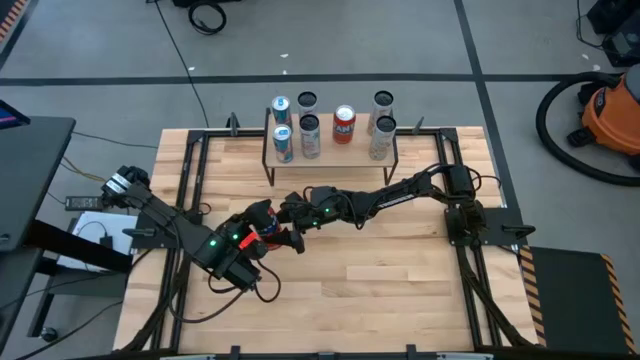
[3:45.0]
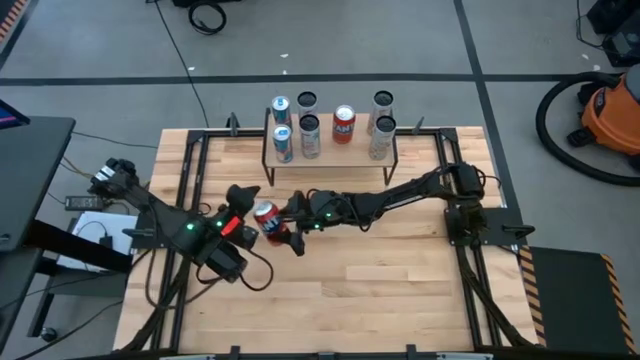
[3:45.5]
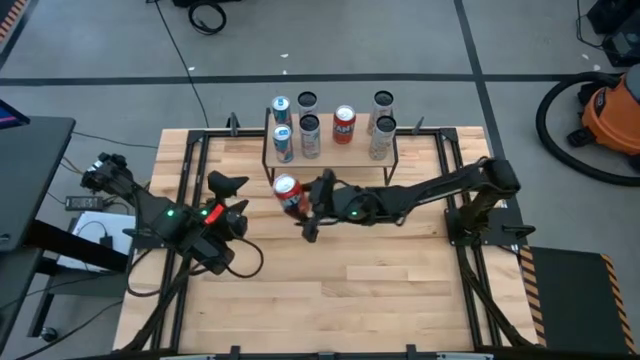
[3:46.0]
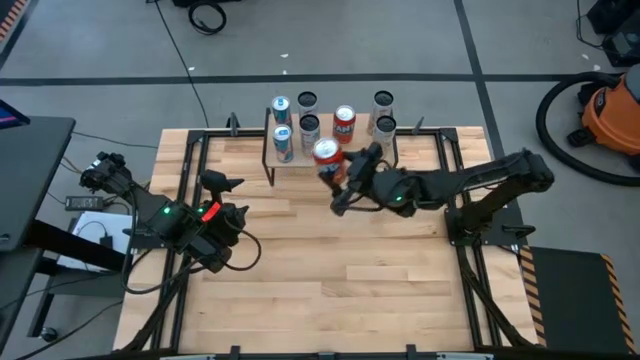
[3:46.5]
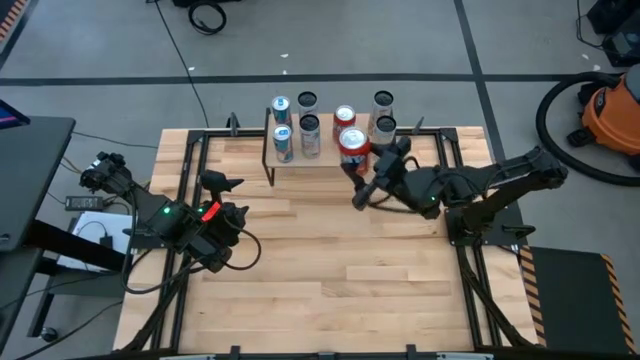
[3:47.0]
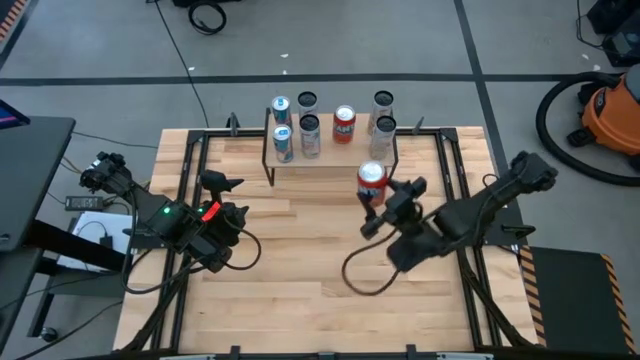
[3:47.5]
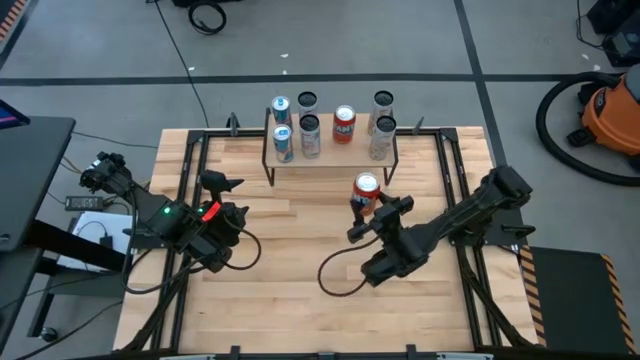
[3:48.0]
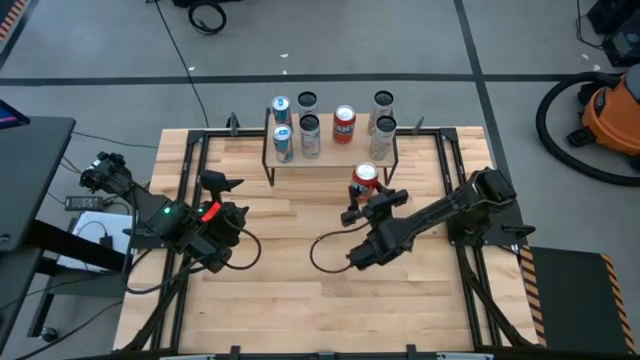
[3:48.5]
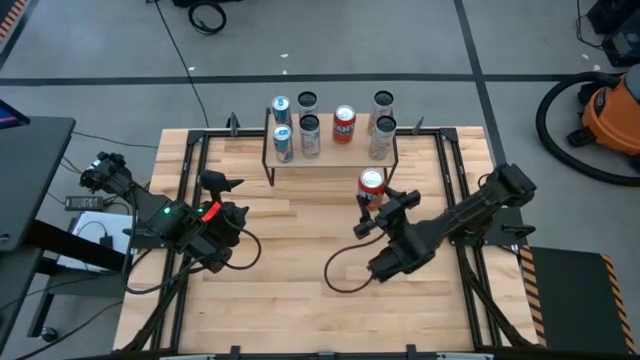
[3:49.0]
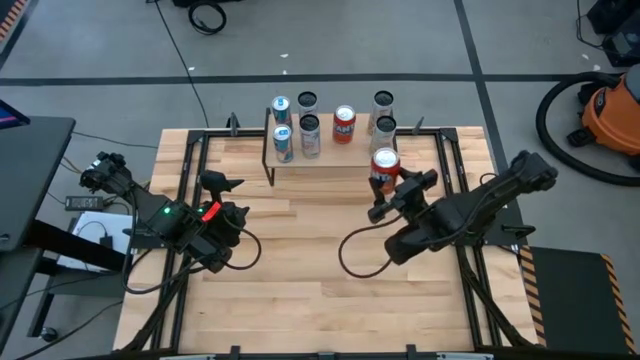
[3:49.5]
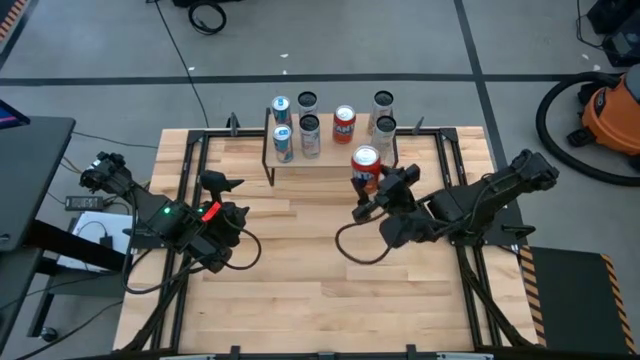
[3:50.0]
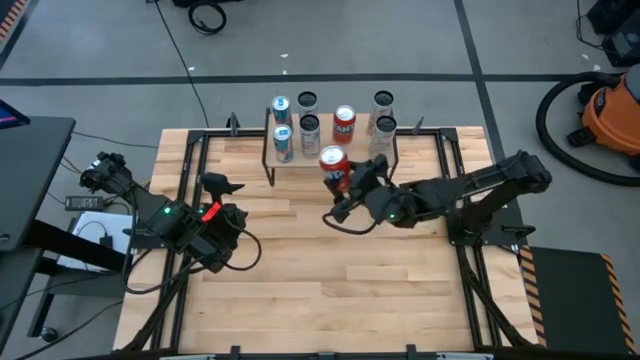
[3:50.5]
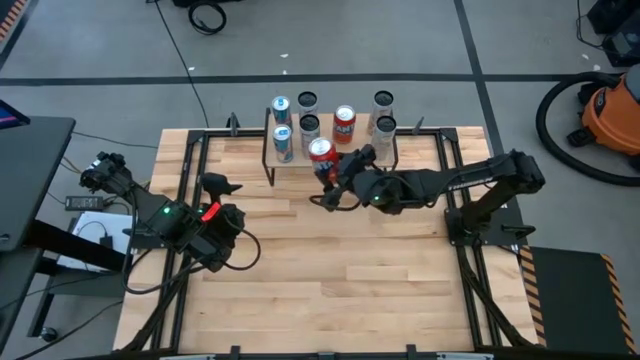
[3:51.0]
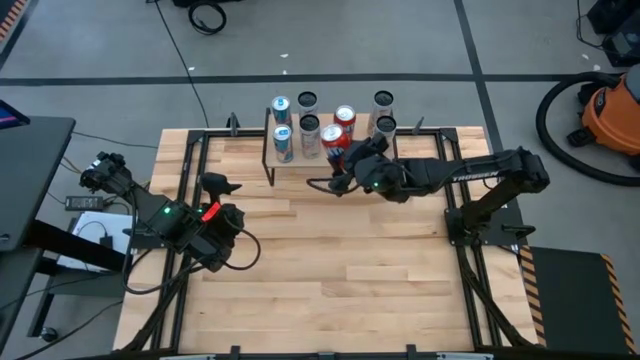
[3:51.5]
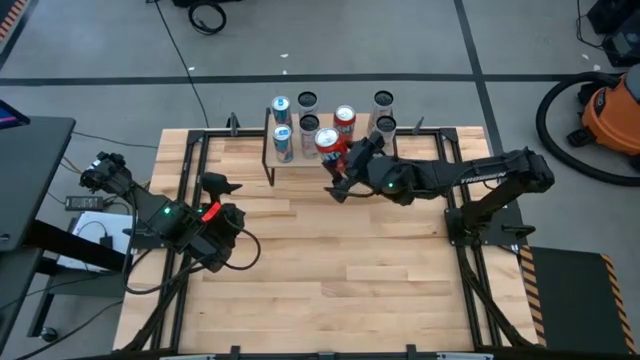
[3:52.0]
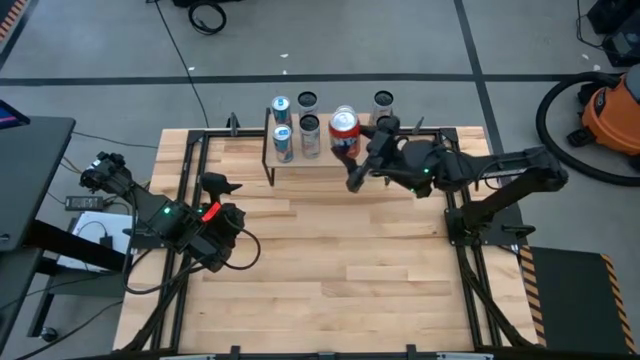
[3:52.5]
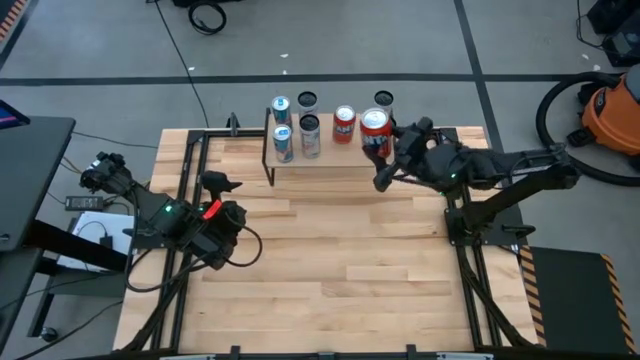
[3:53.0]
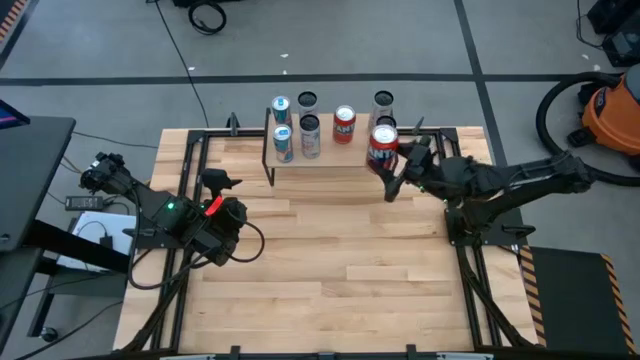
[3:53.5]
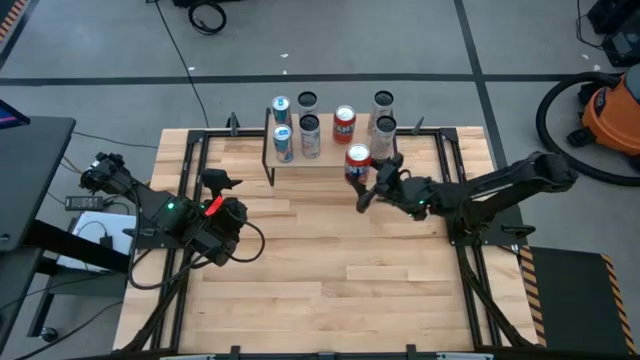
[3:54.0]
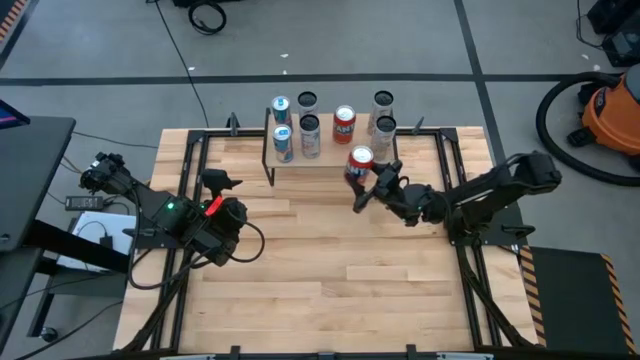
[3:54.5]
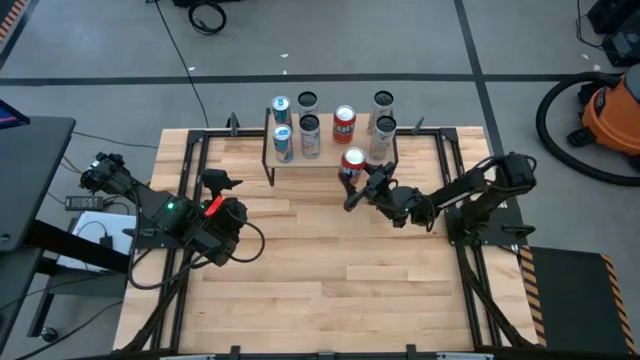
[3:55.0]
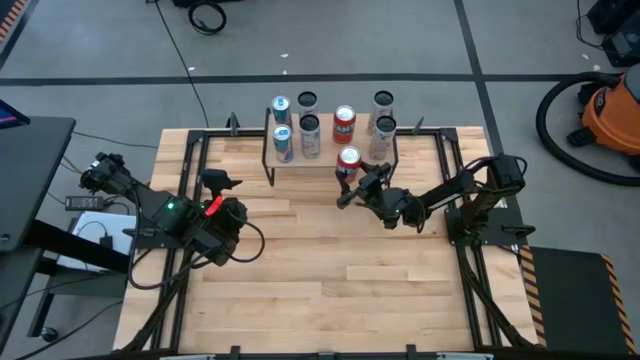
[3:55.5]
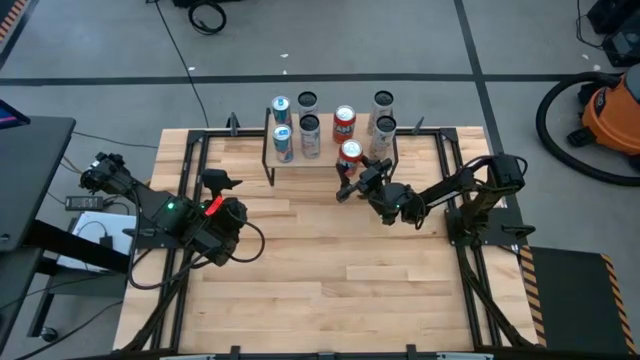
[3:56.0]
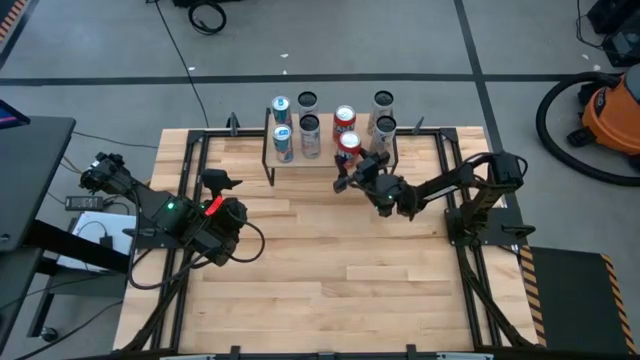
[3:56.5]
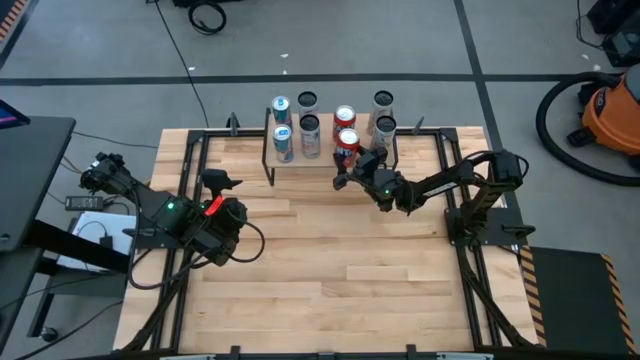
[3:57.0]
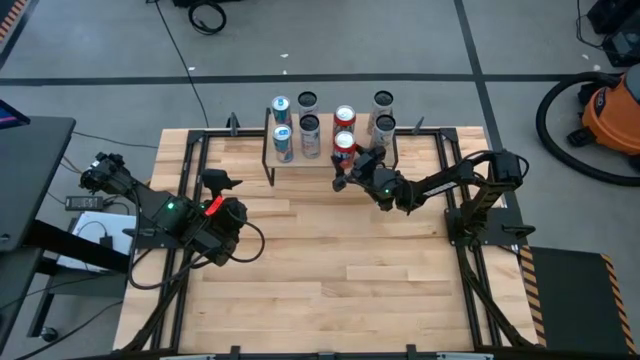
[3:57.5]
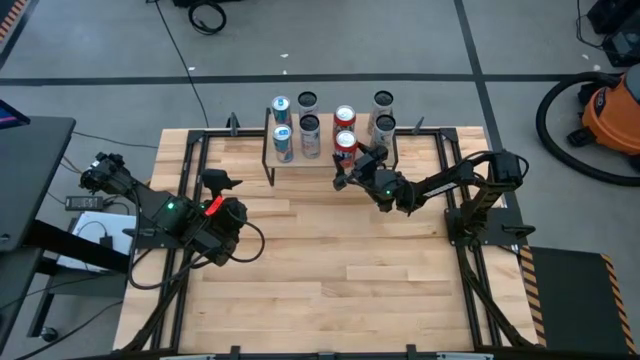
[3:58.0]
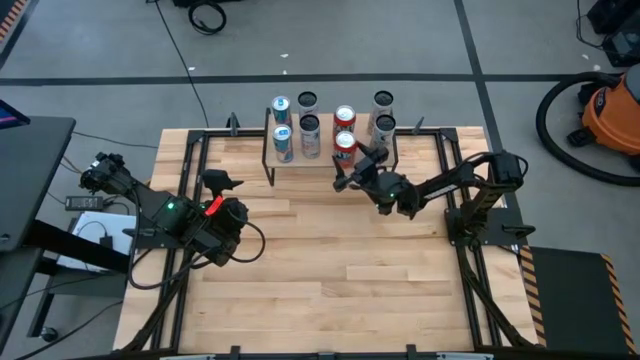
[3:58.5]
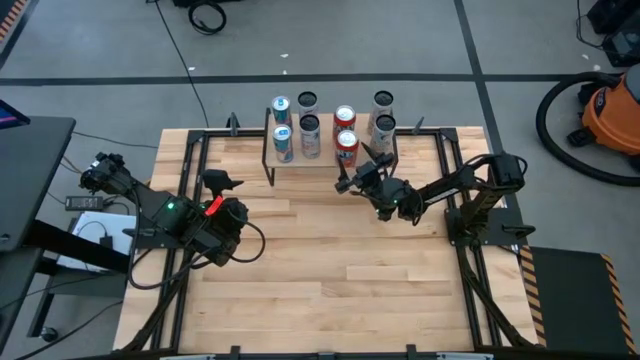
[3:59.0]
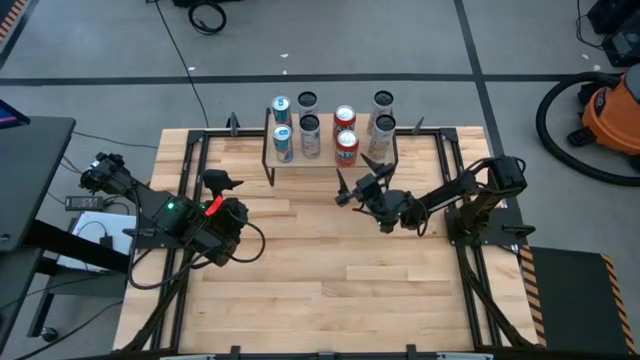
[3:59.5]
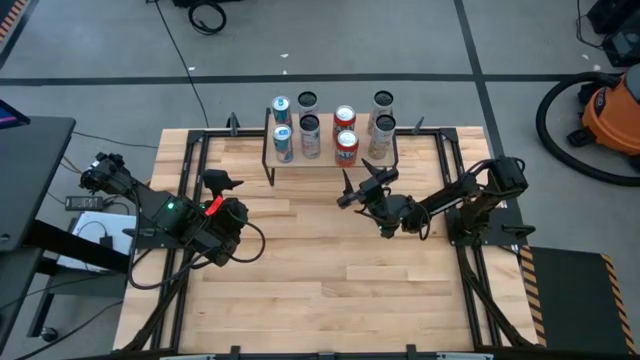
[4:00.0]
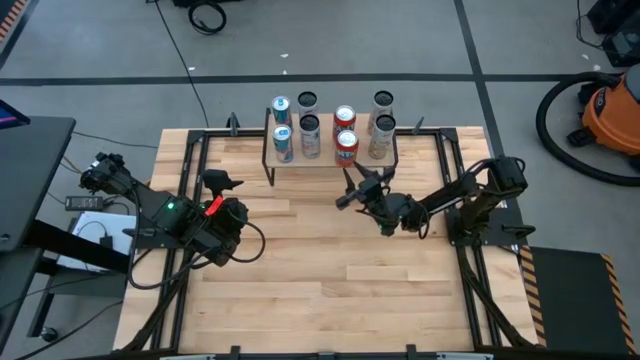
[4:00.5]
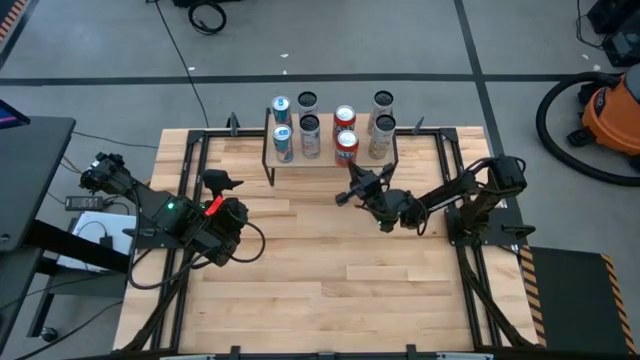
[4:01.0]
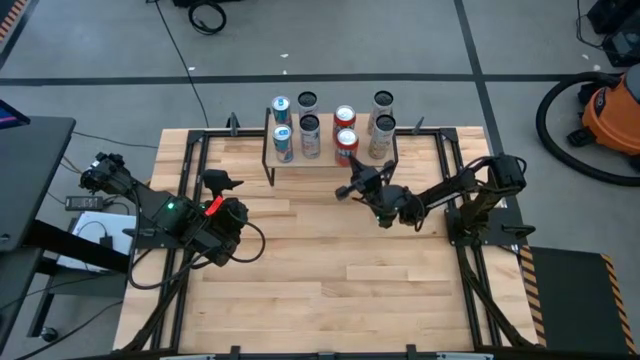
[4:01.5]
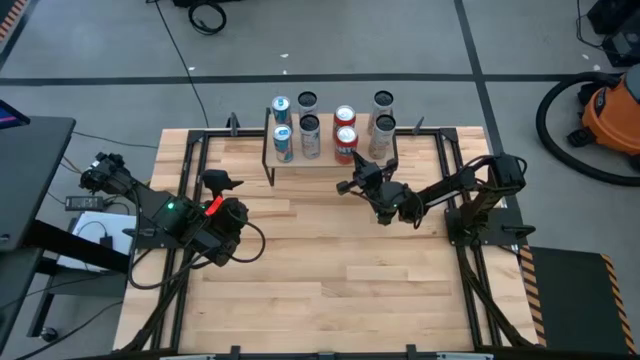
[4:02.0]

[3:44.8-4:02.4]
Task: Place canned beverage on shelf
Put the orange soda can on the shelf

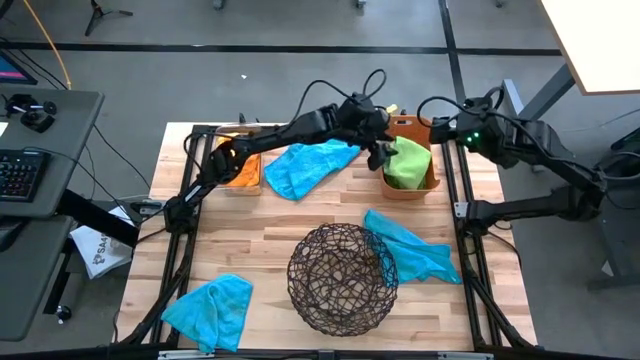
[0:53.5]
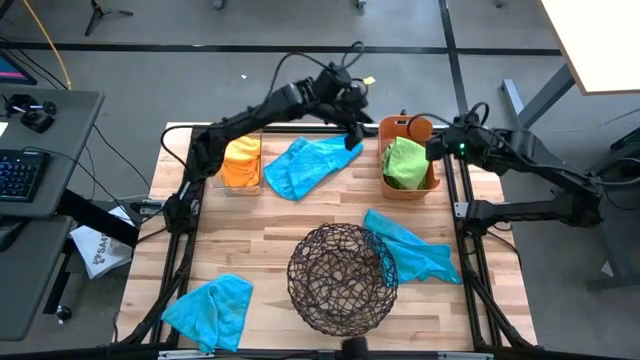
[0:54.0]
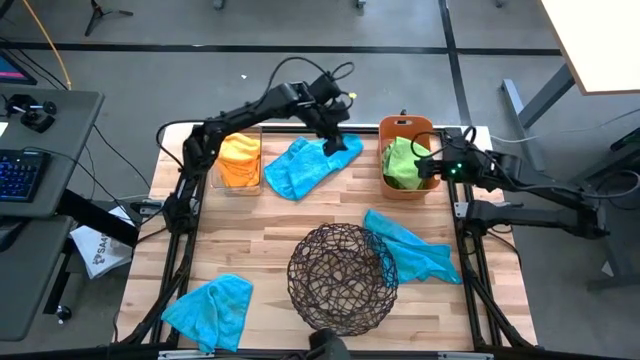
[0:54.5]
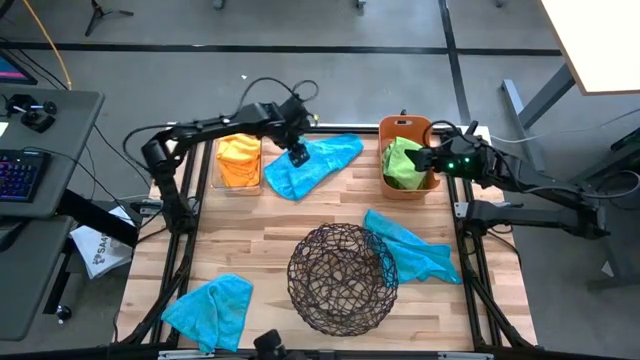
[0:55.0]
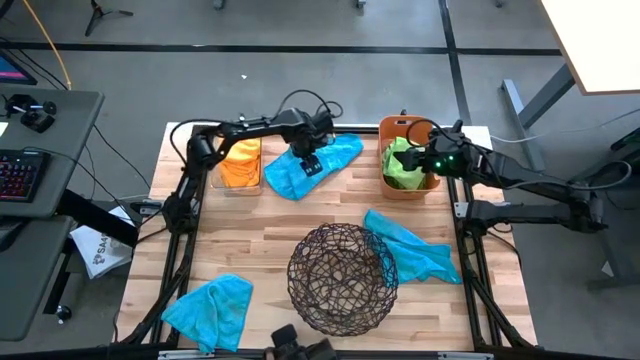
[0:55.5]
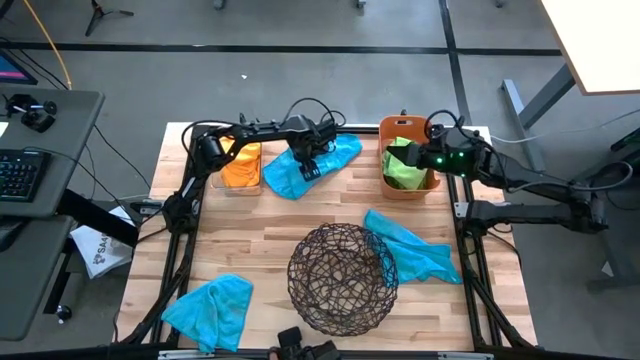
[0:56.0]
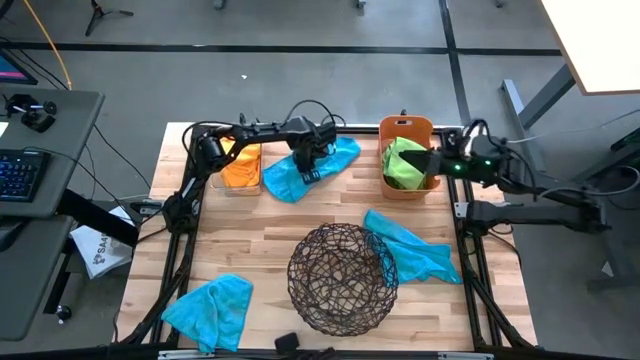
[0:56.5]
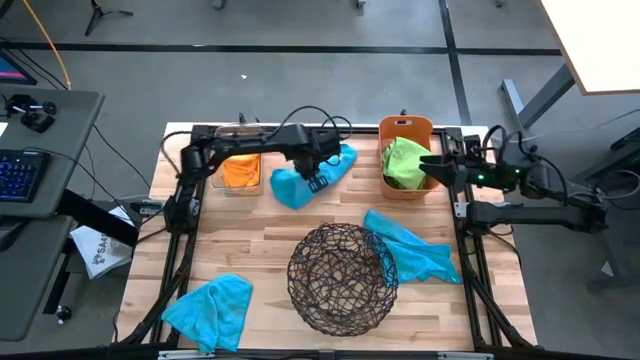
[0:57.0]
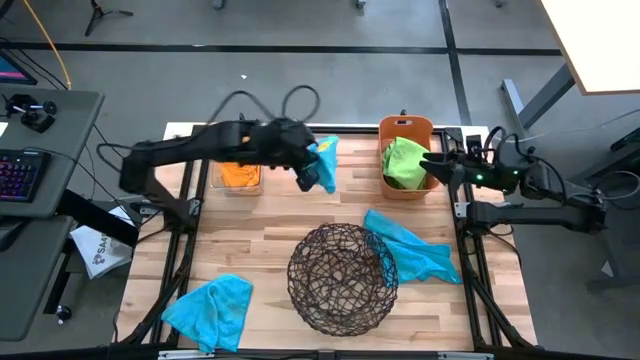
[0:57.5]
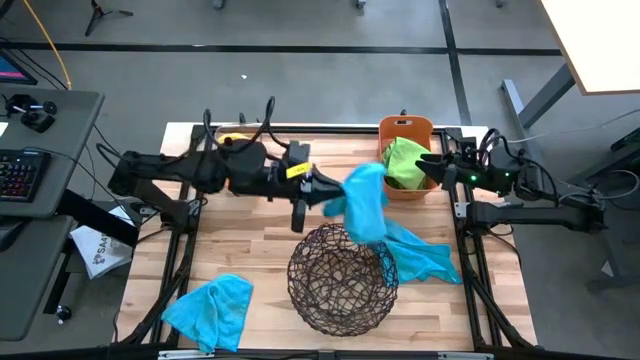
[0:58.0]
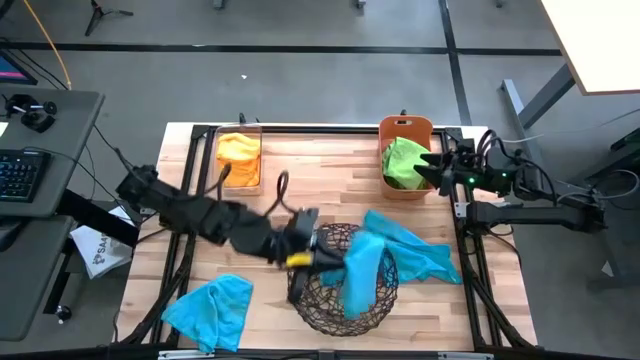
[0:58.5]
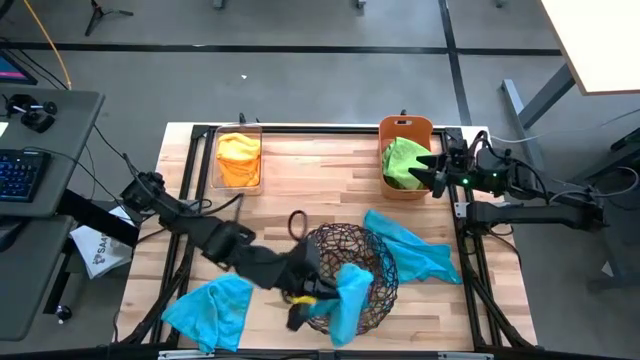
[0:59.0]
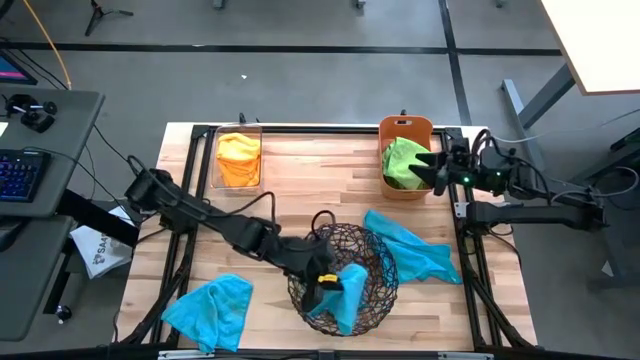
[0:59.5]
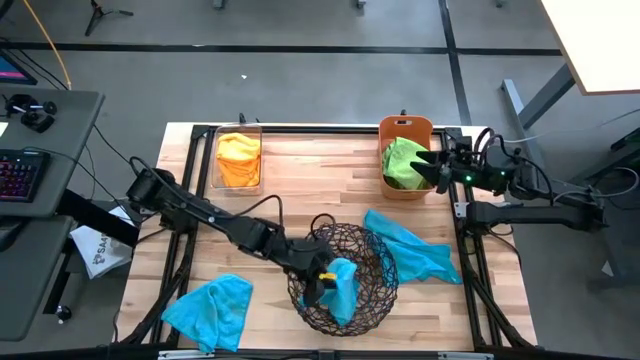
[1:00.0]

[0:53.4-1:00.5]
Task: Sort microfiber towel by color & place in baskets
Put the top blue towel into the black basket
